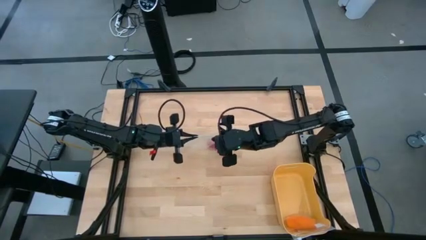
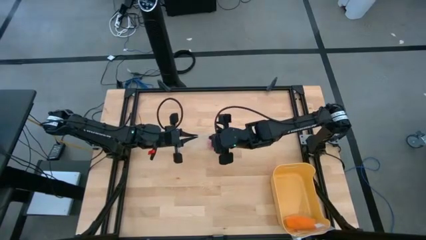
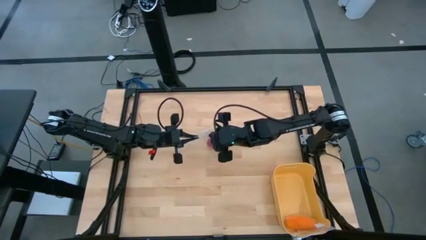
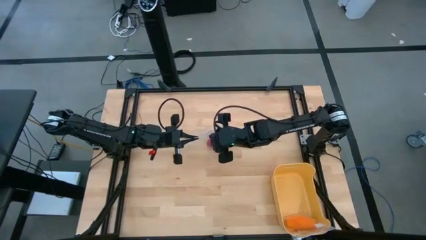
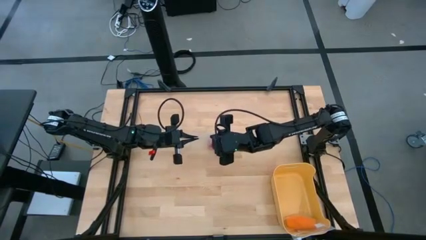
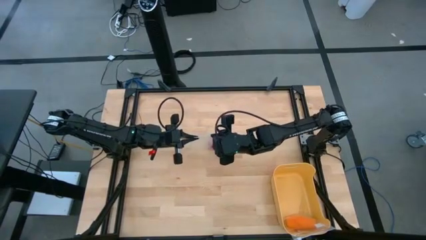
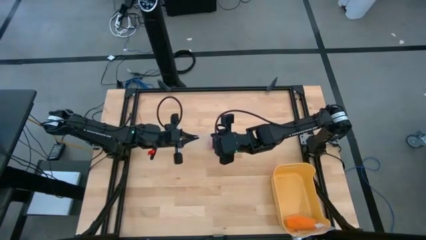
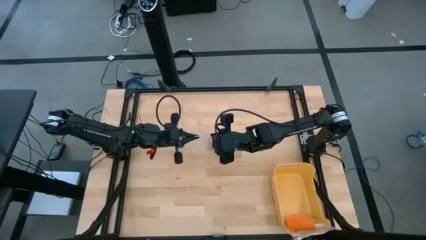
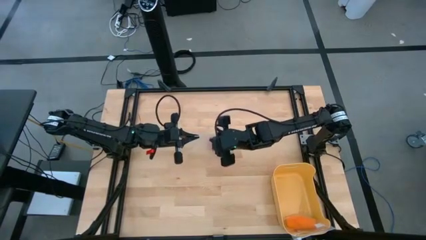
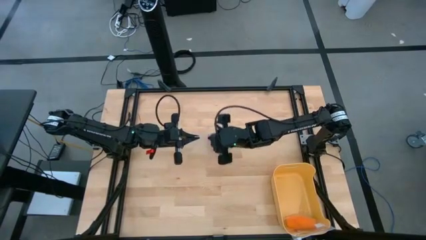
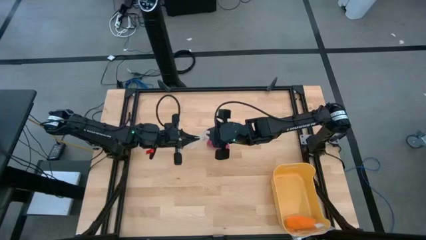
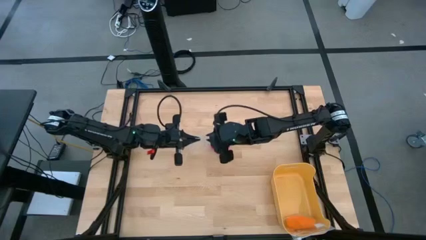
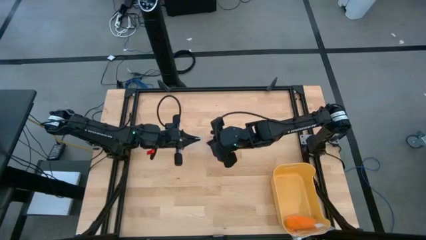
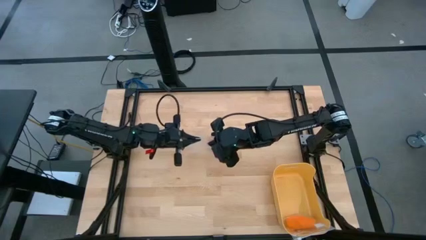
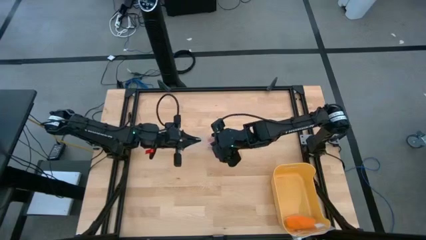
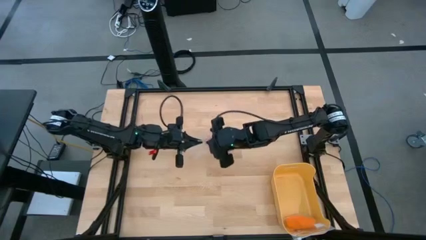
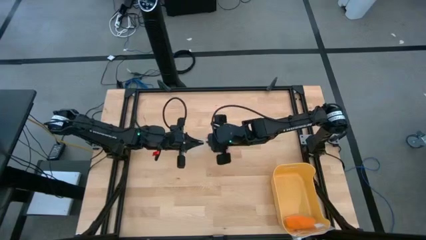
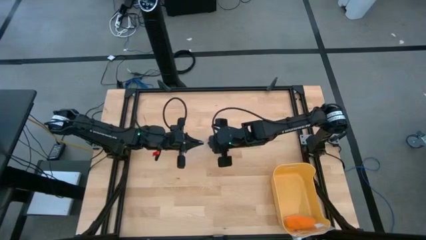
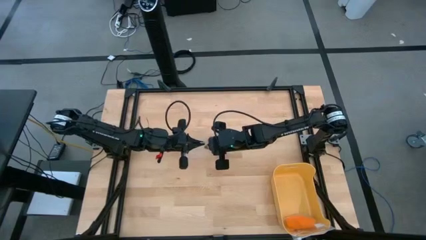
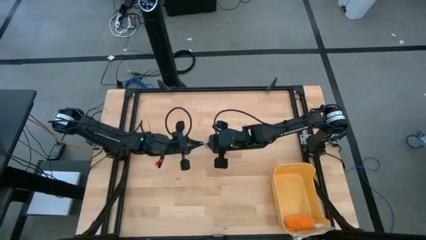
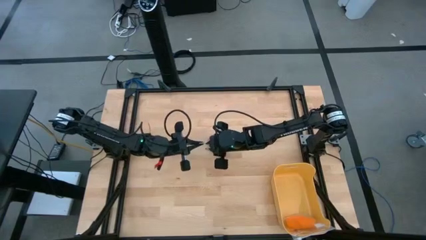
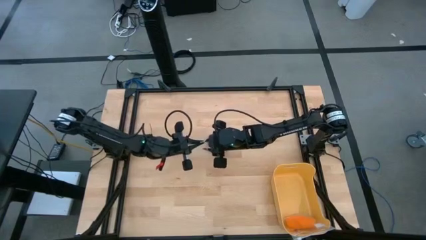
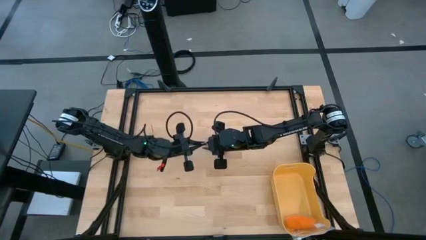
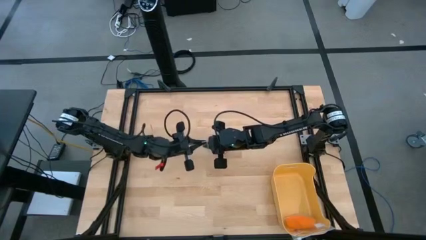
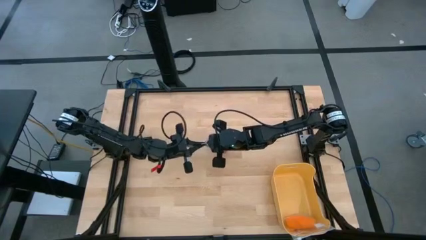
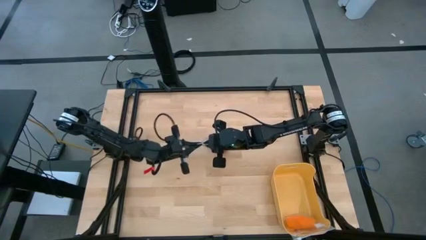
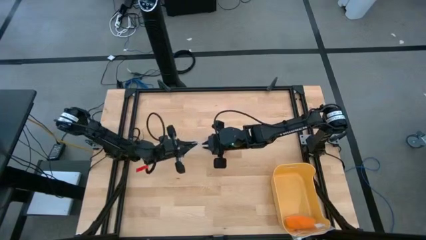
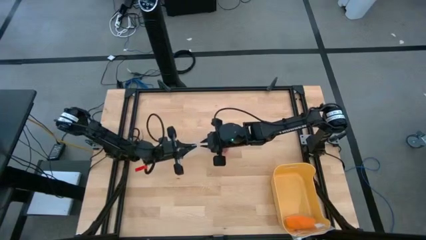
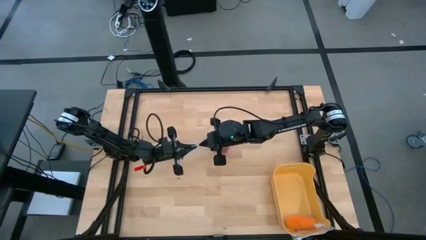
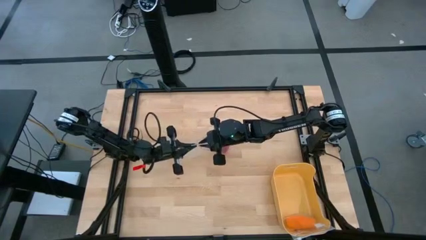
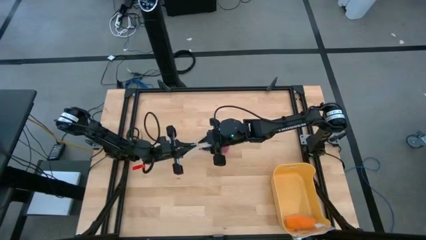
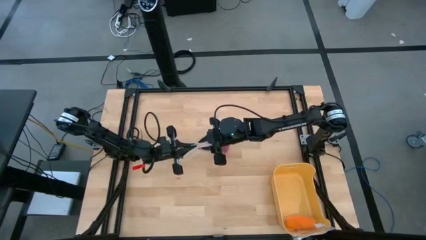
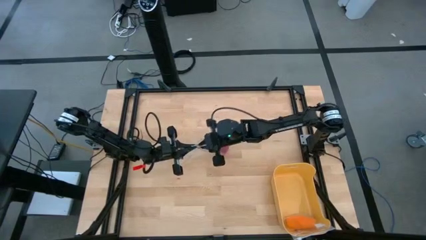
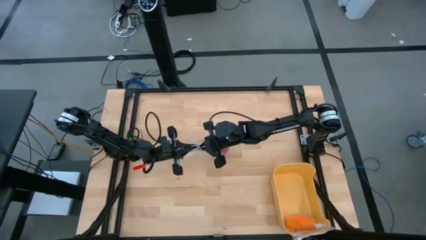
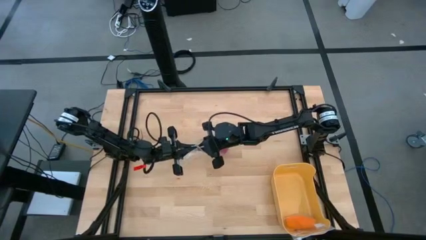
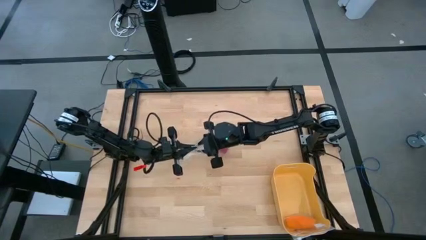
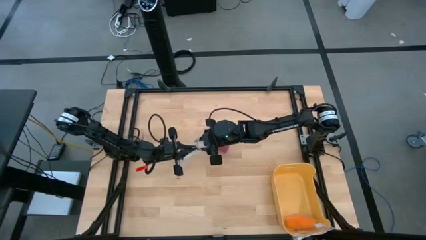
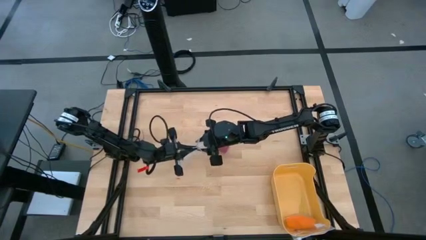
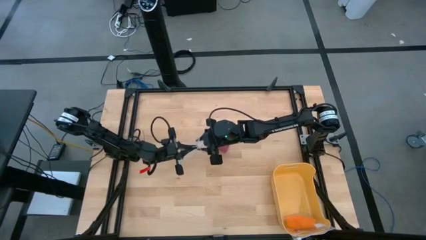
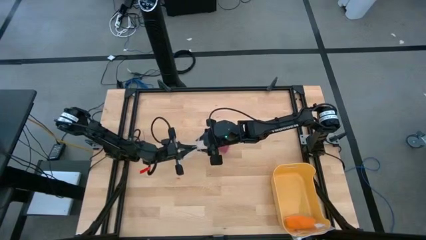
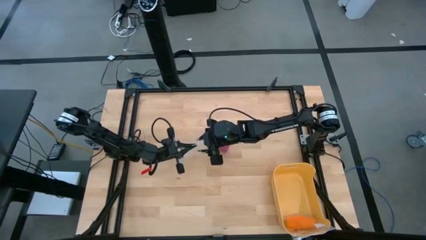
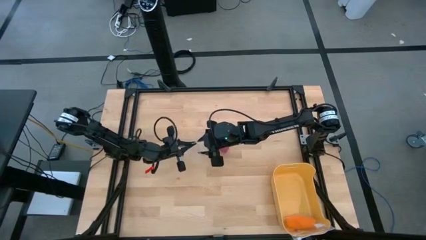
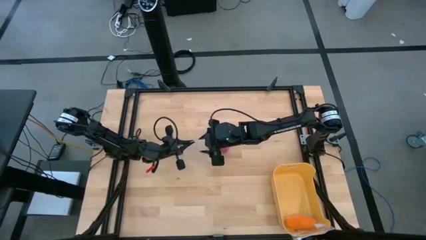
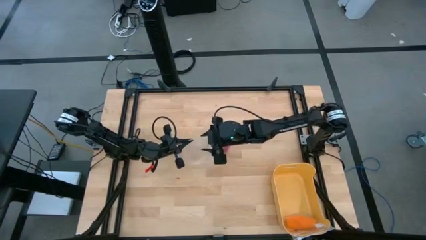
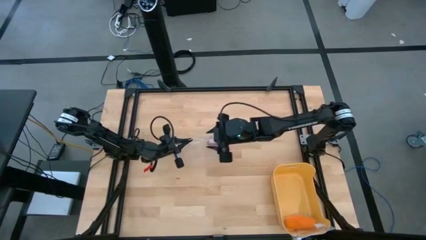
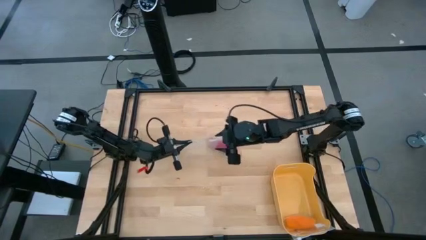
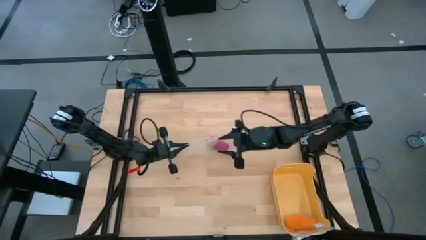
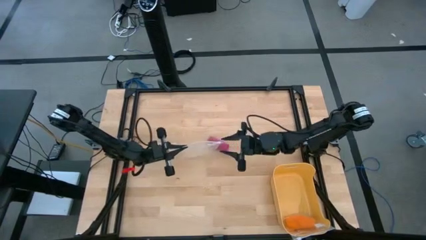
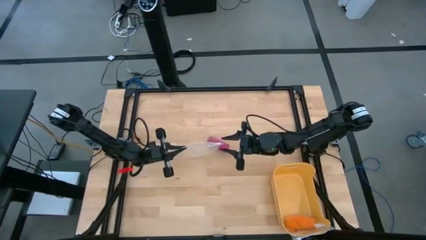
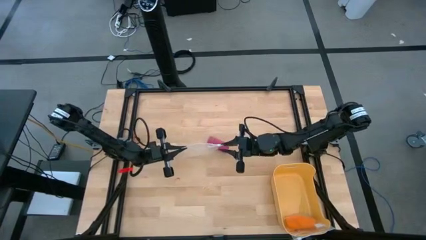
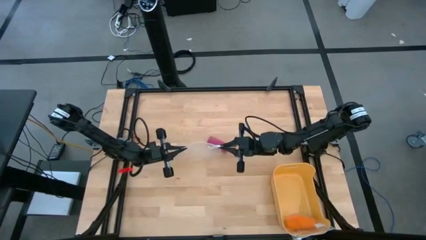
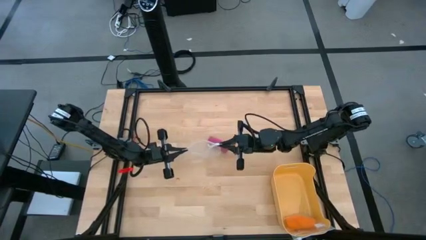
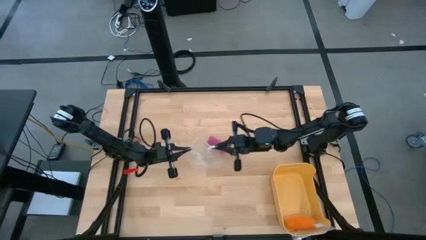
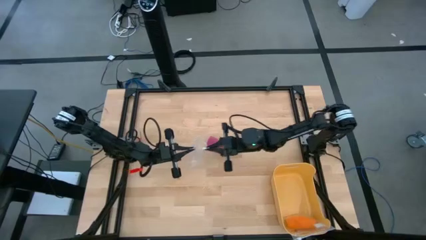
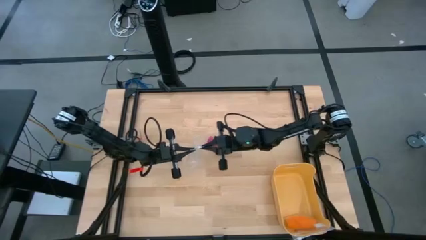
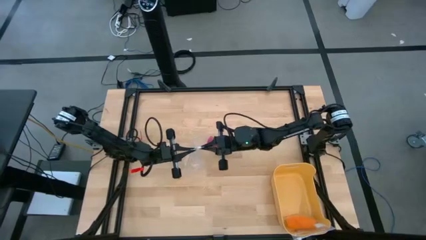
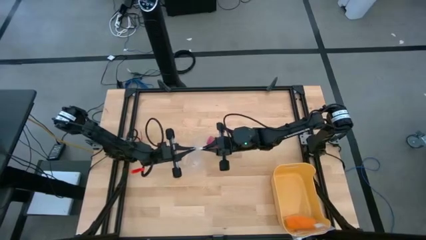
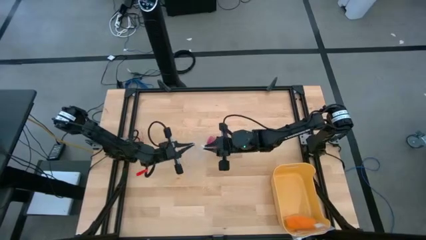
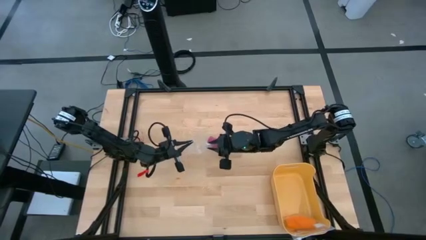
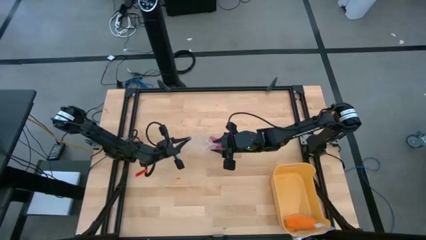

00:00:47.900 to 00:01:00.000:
Task: Roll bandage
Open the transparent zip bag

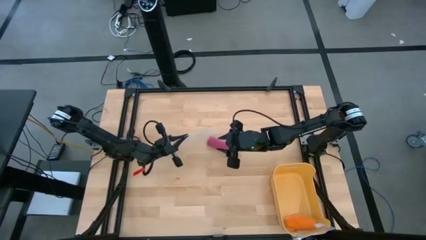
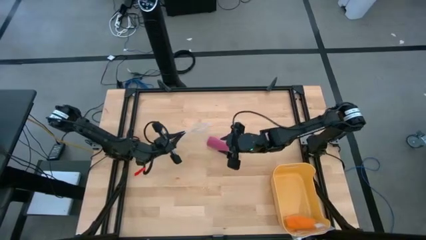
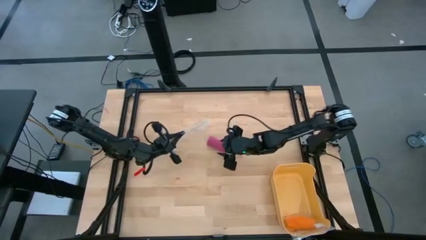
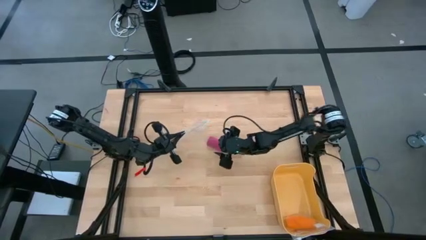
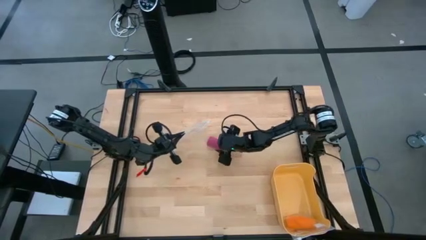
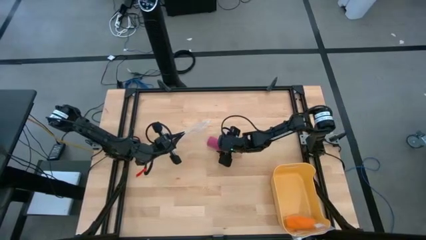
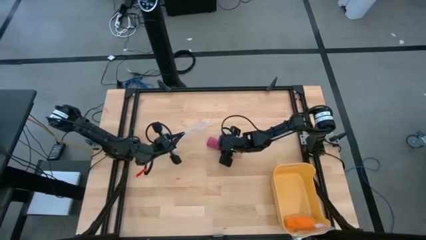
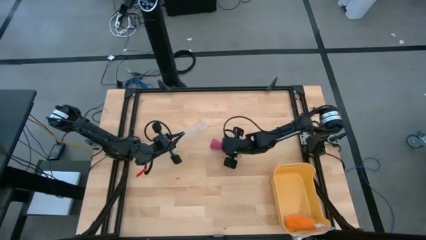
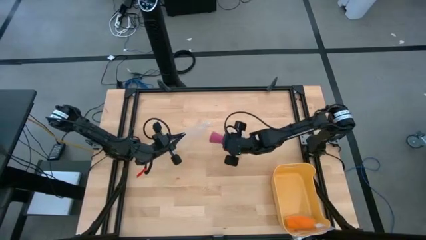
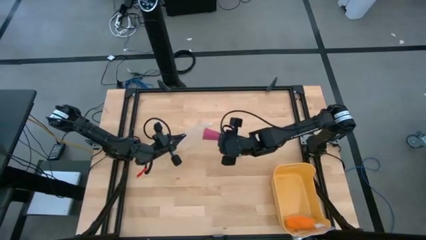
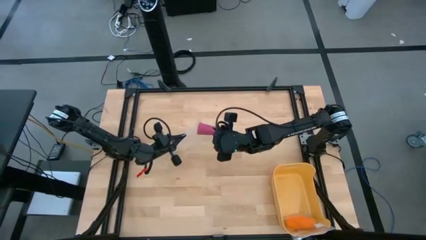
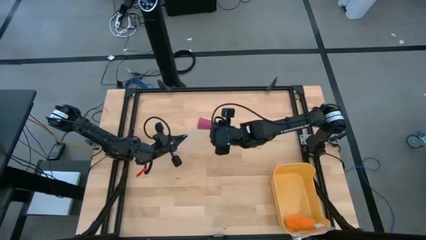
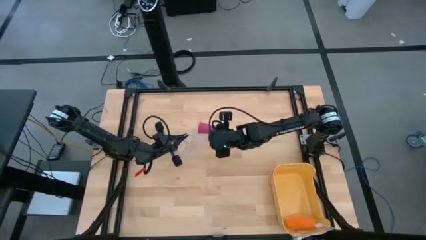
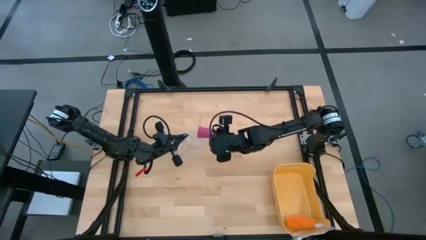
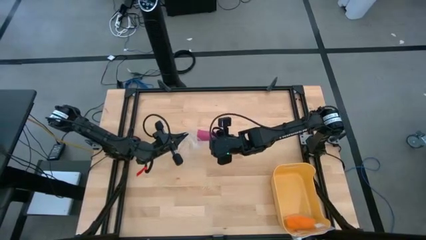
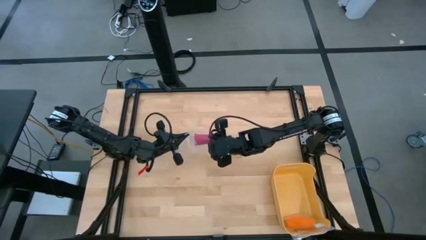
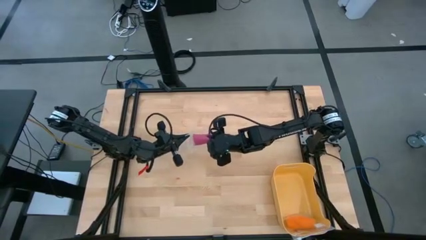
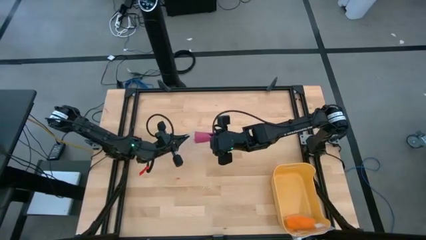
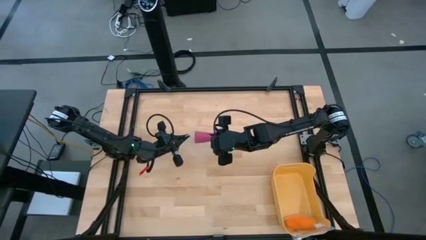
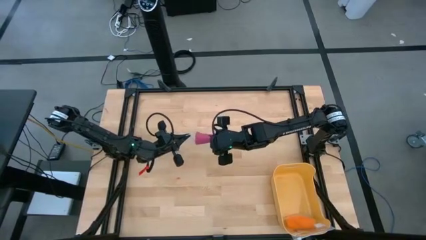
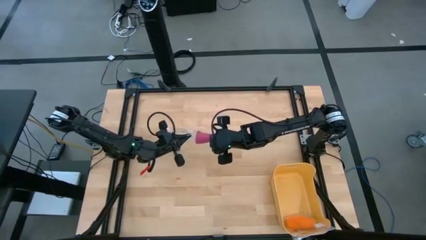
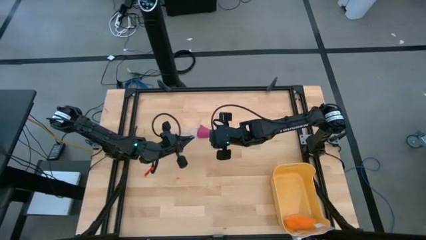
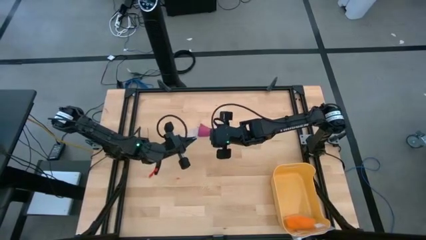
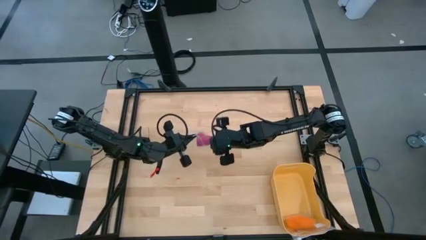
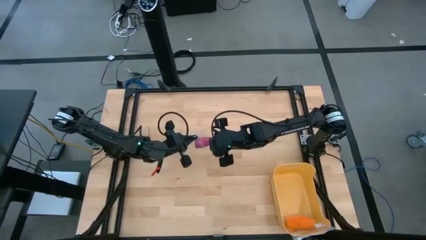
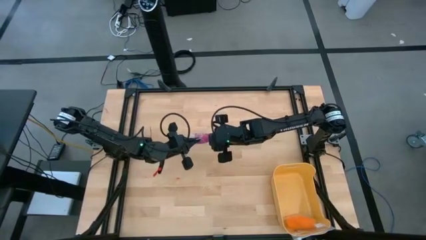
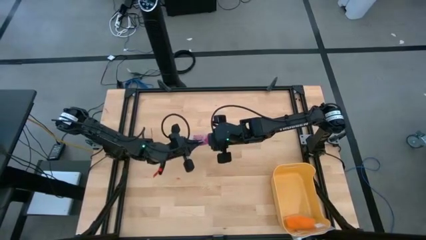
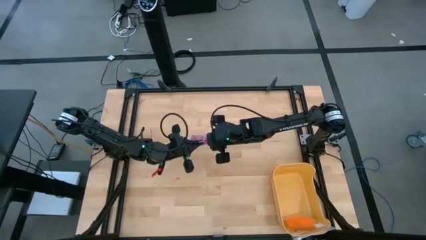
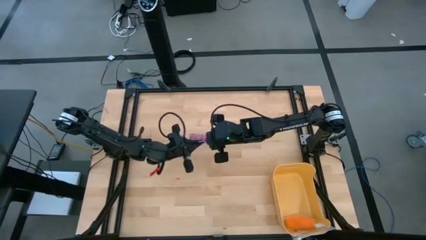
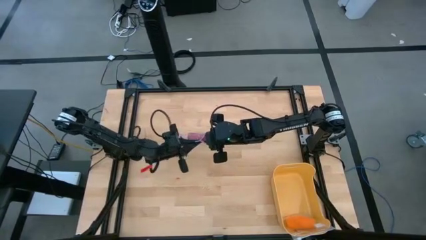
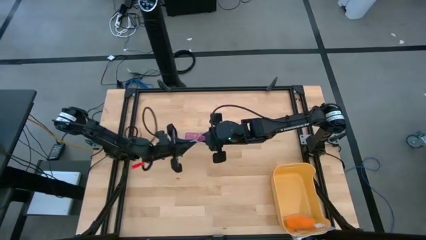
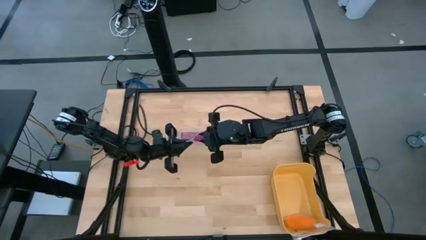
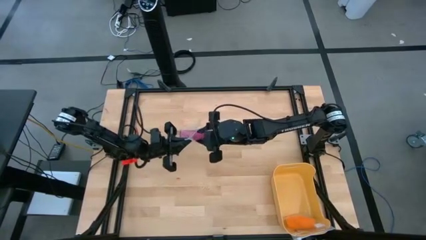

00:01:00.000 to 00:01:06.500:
Put the rolled pink bandage in the transparent zip bag
